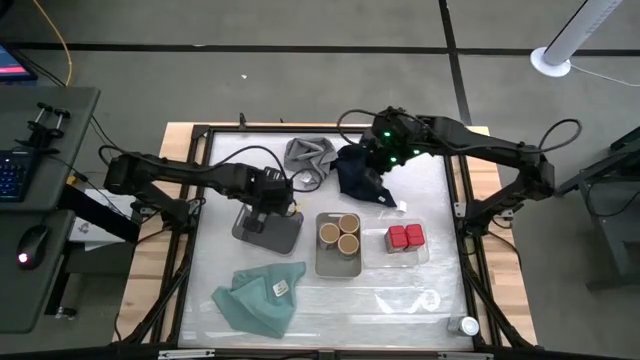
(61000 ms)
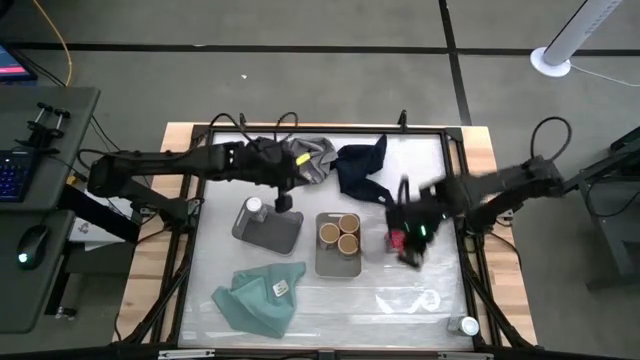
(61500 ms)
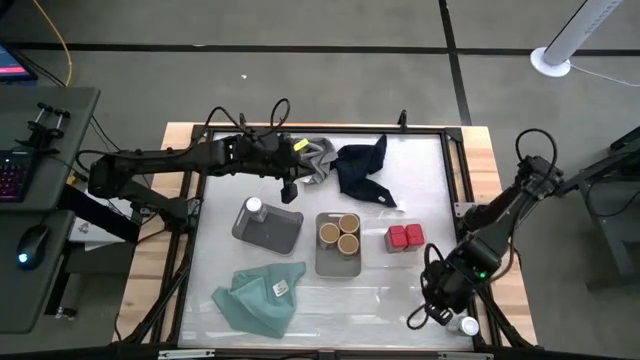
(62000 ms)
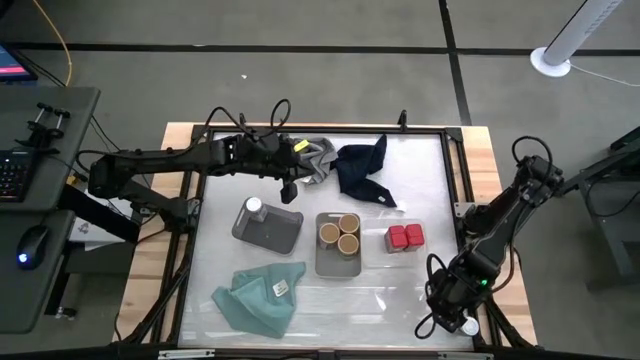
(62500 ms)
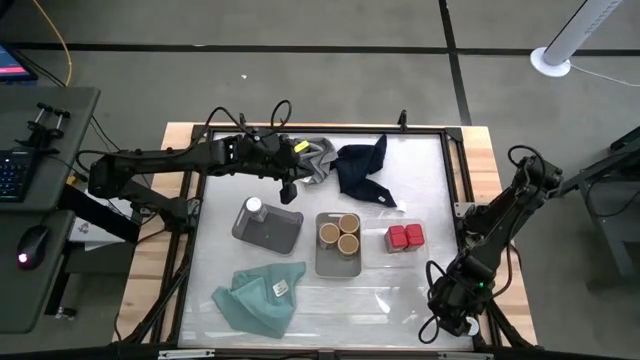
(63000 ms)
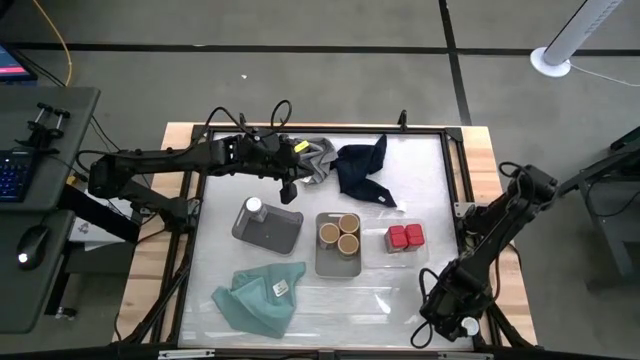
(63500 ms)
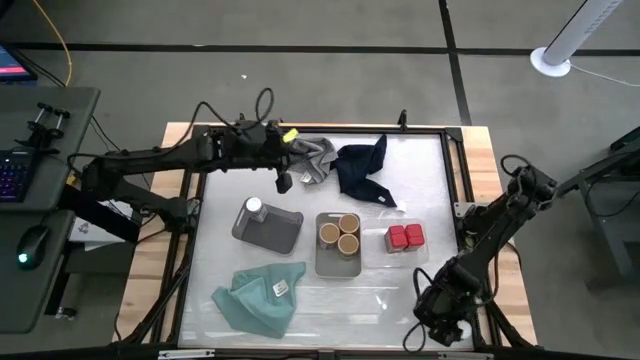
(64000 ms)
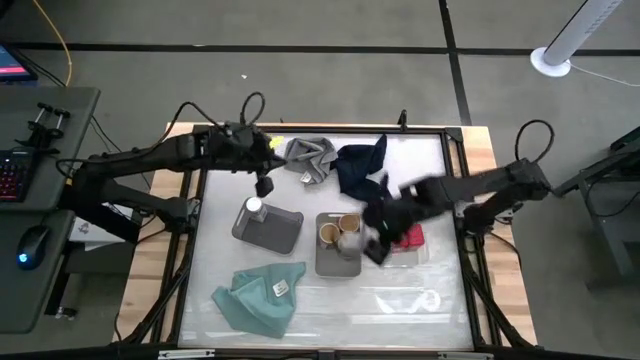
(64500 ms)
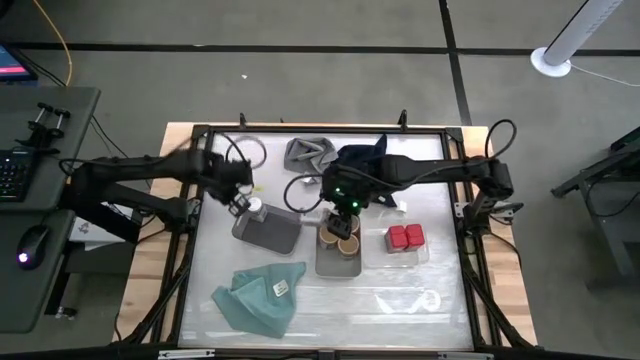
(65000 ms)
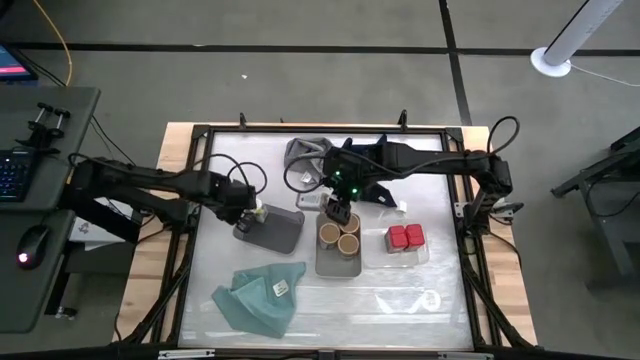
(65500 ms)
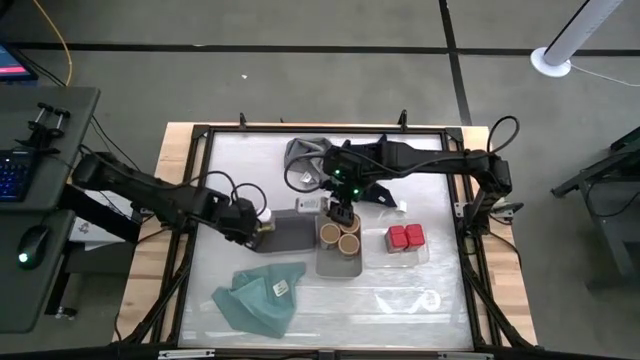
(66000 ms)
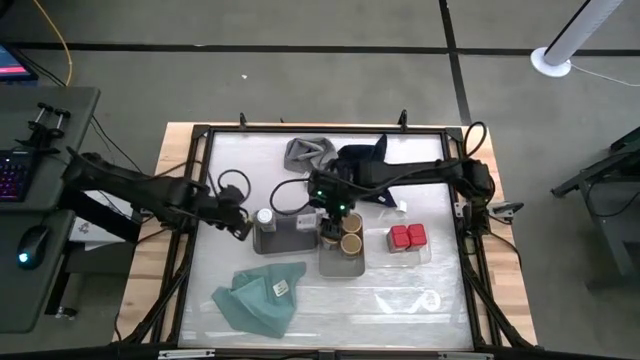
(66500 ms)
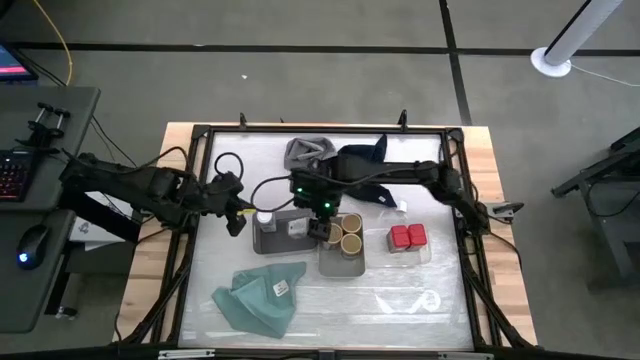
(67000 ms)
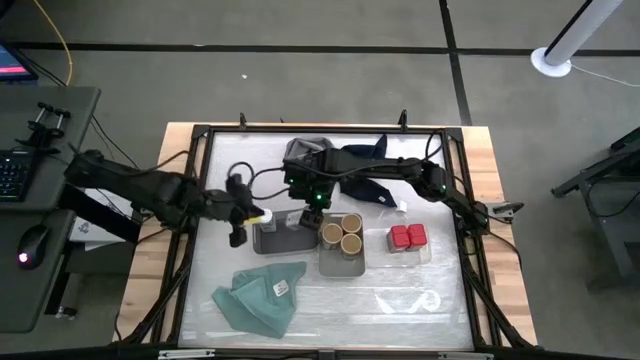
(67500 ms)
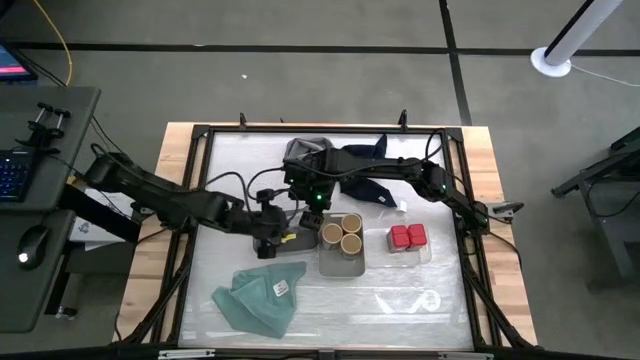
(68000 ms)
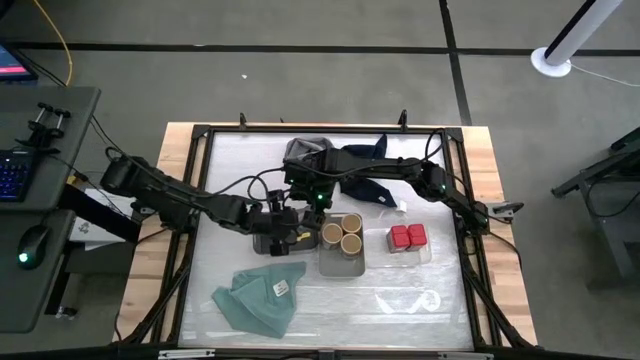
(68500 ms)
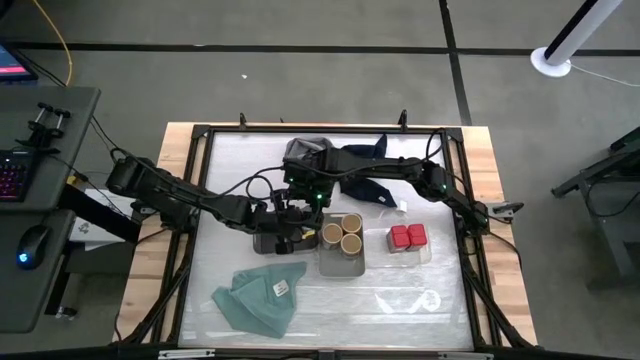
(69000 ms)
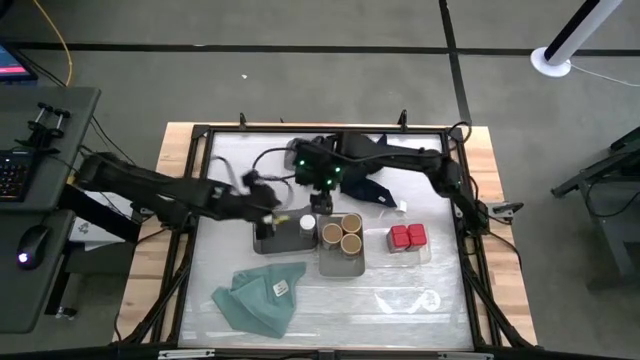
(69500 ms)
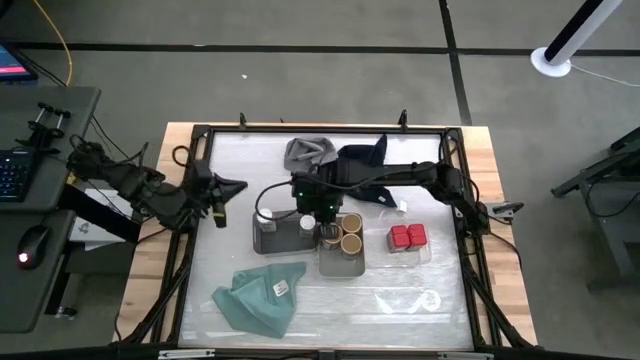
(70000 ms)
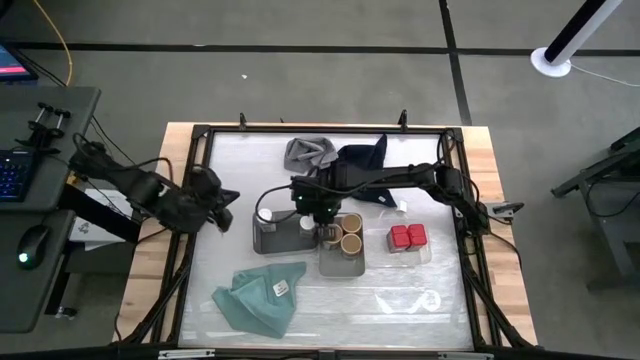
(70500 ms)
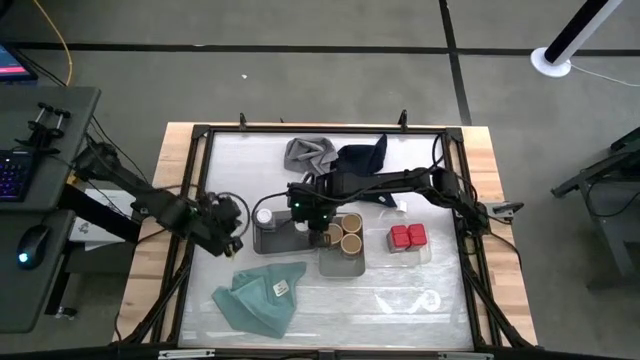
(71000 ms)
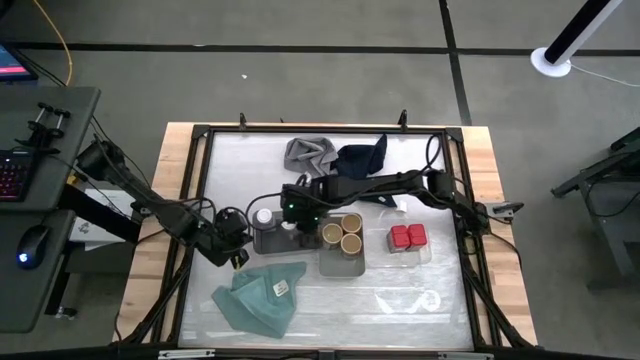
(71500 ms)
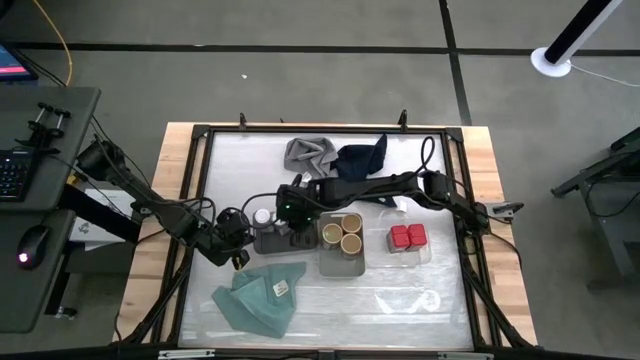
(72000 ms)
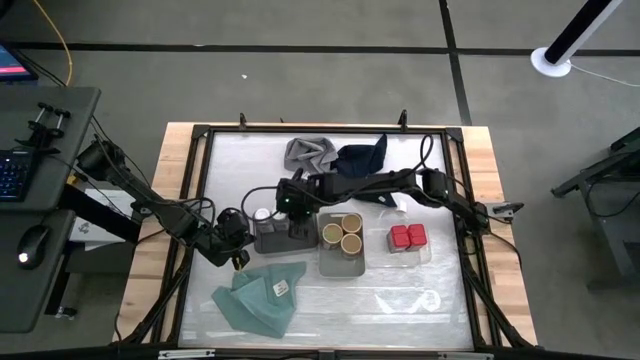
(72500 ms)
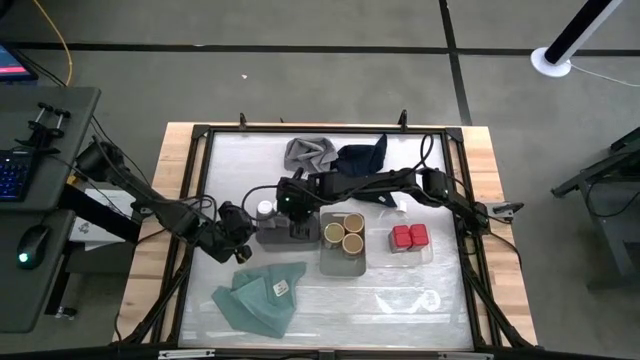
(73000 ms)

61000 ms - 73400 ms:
Task: Sort spices by type
Put the white spice bottle into the black bin

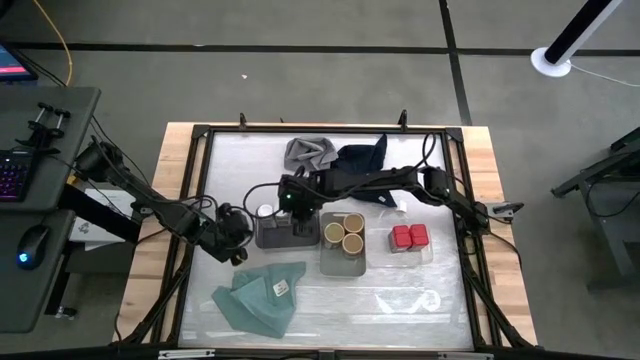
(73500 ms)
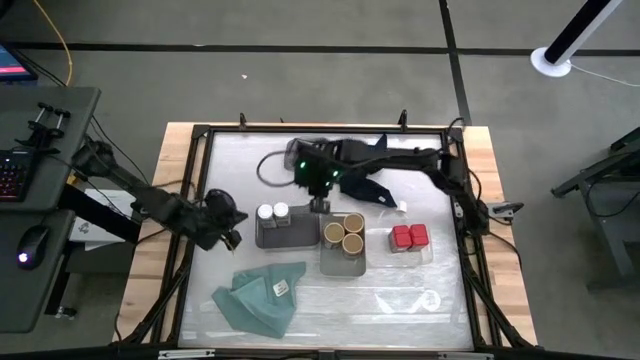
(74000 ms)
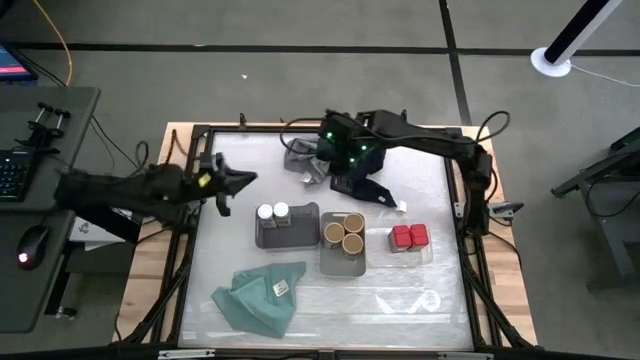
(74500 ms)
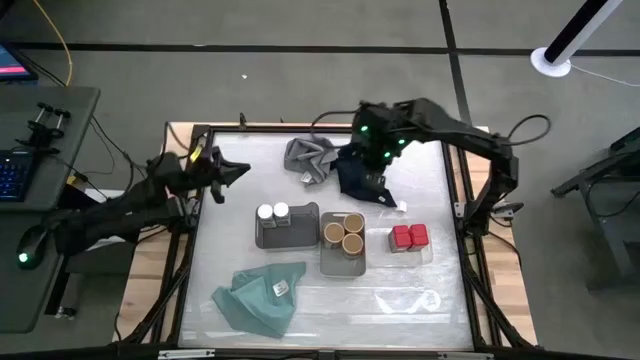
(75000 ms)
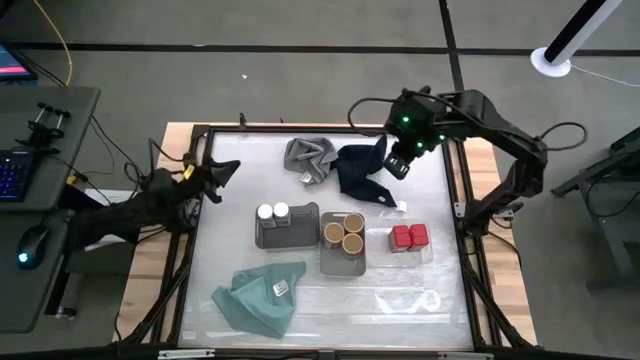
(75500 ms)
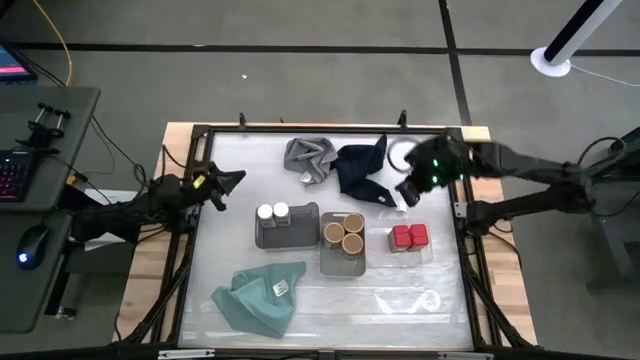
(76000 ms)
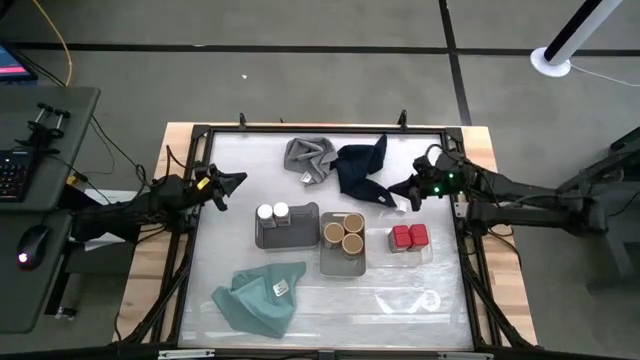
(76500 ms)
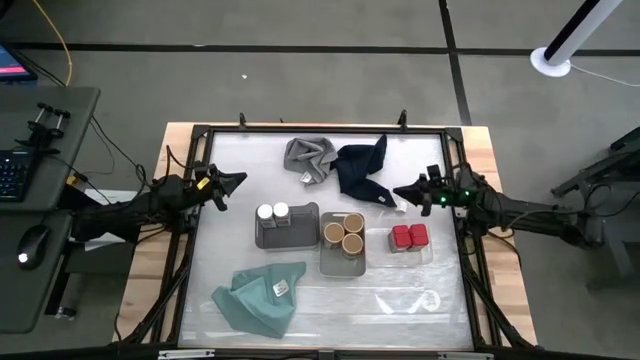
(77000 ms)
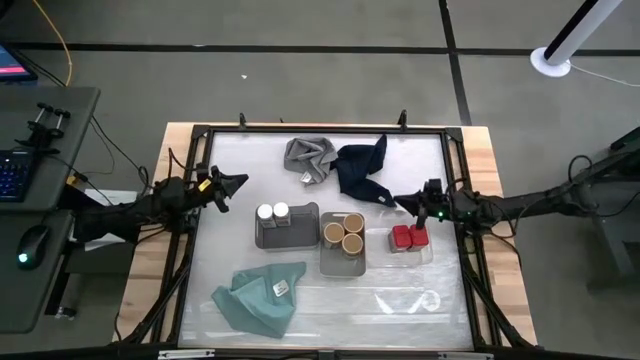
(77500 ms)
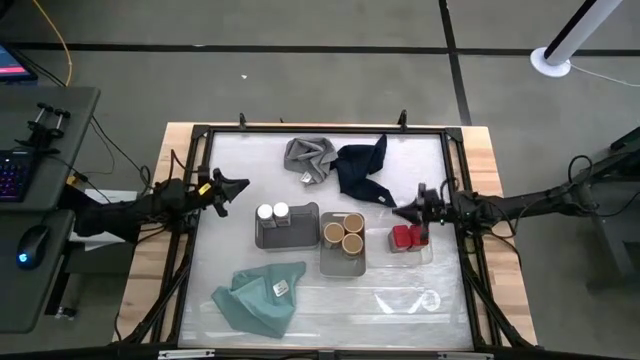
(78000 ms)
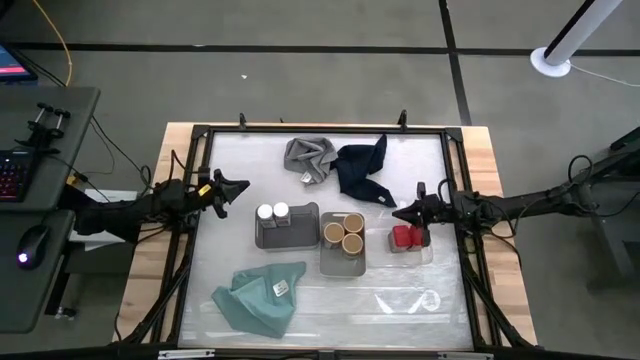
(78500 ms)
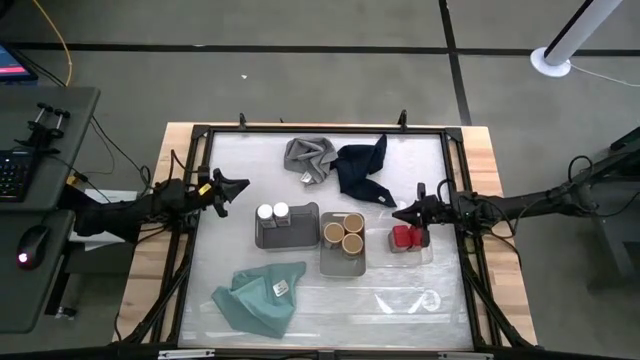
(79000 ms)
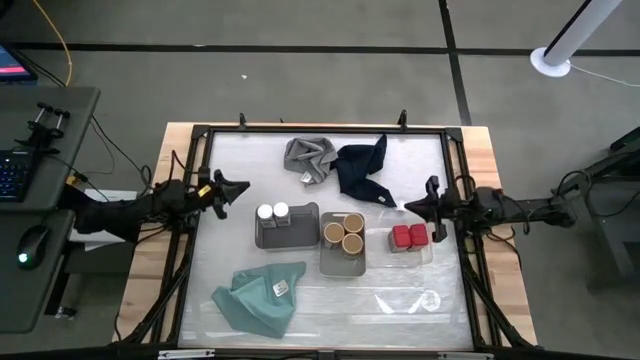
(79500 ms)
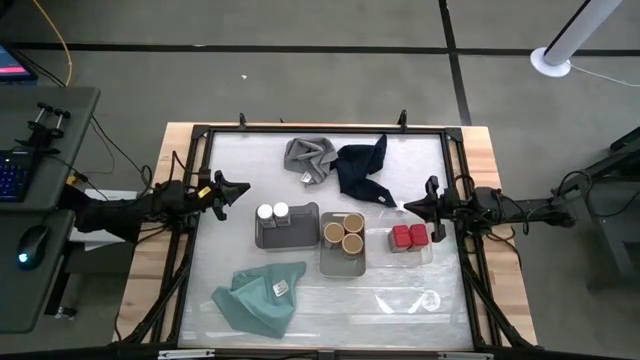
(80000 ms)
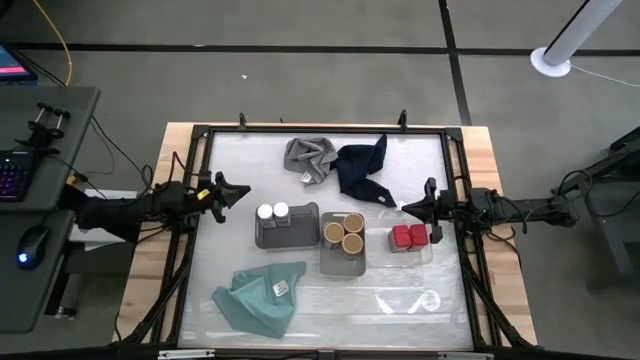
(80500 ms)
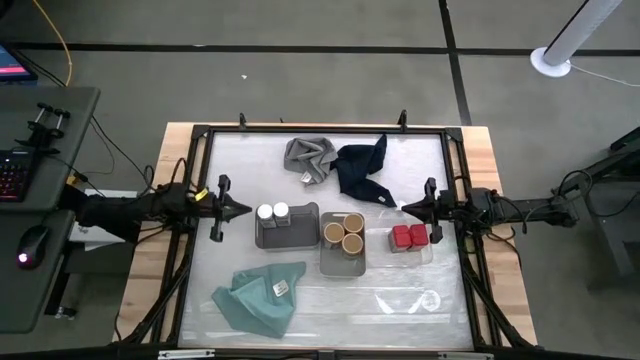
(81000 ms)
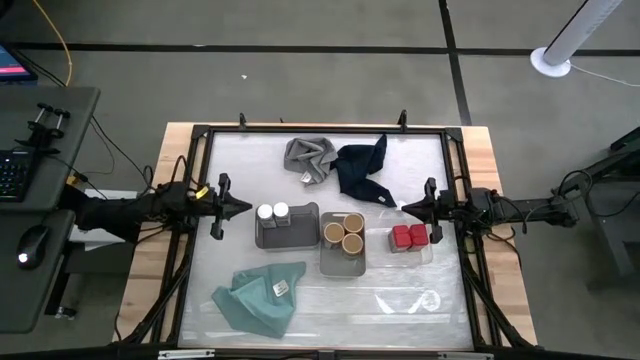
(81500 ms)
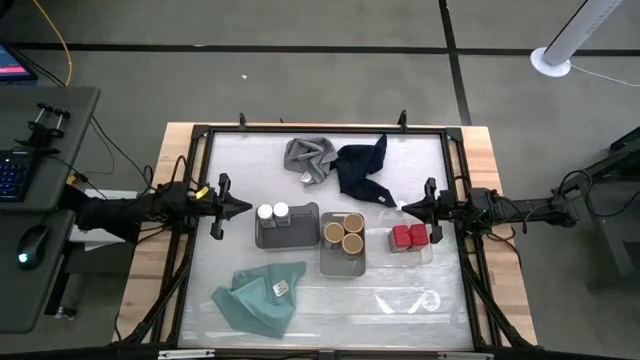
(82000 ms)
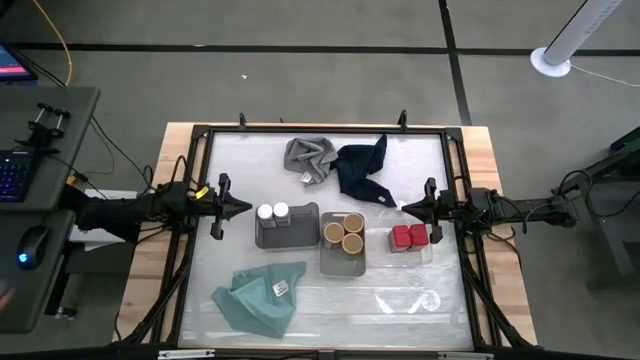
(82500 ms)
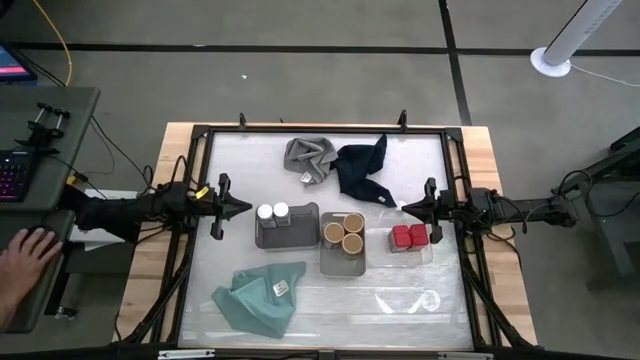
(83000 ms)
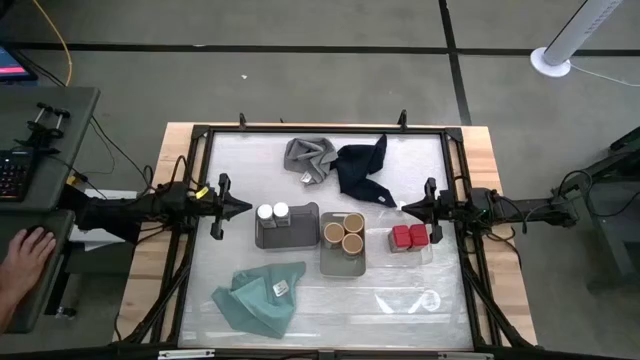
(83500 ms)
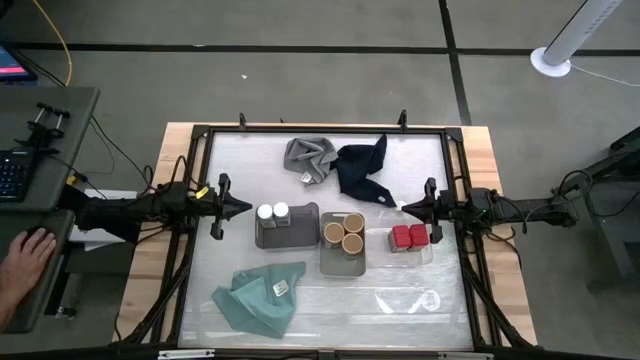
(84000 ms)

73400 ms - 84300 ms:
Return to Home Position
